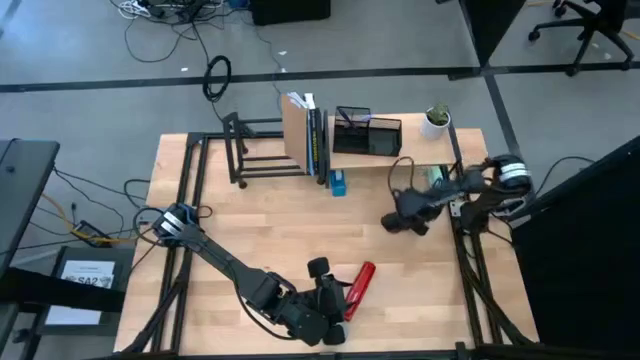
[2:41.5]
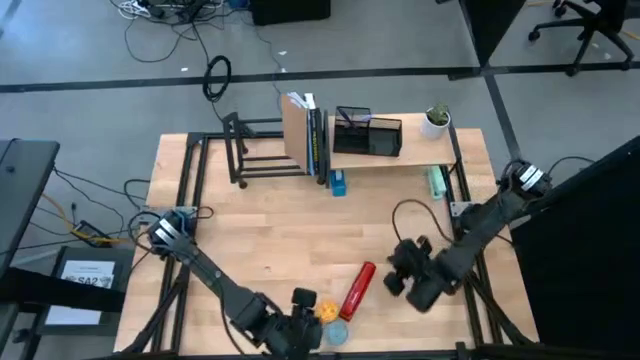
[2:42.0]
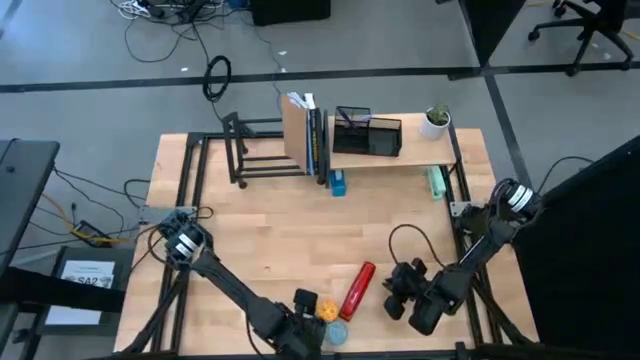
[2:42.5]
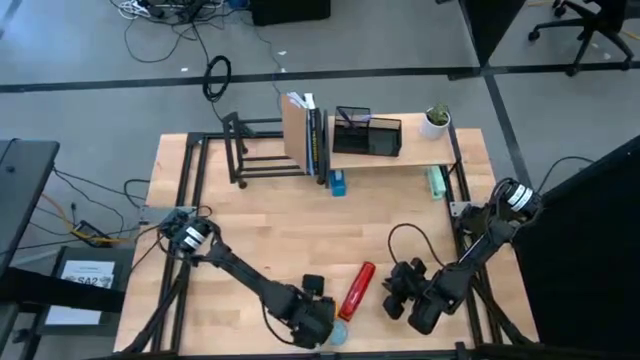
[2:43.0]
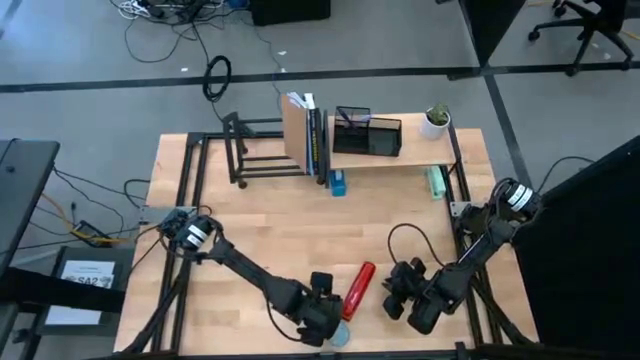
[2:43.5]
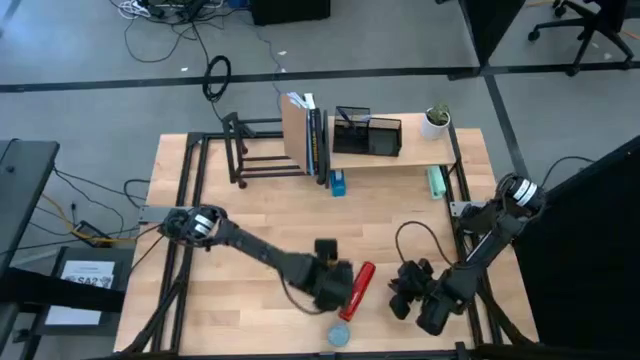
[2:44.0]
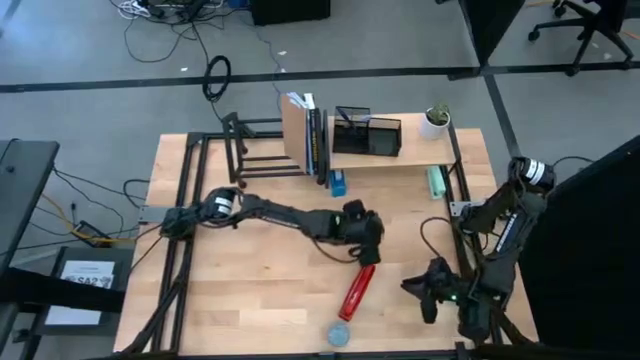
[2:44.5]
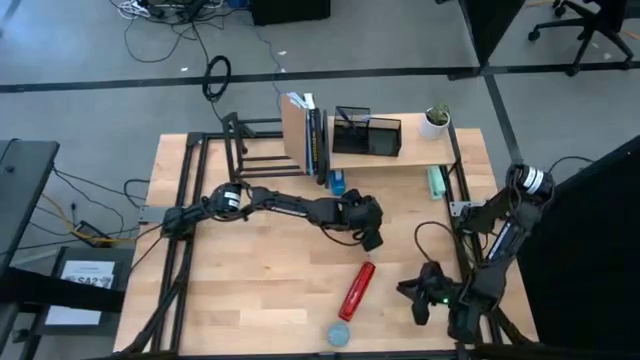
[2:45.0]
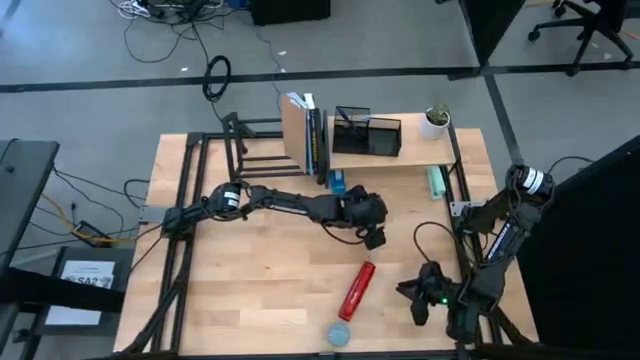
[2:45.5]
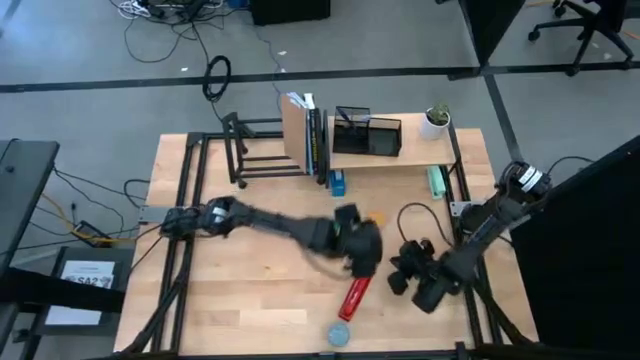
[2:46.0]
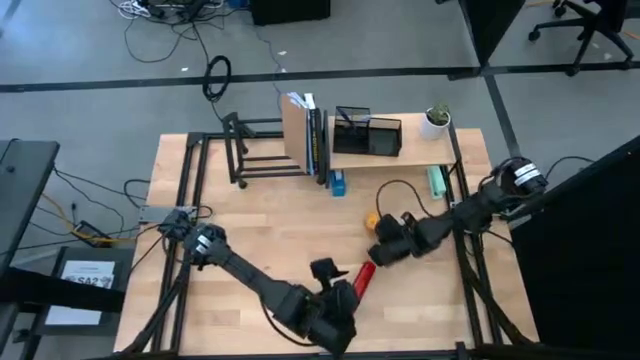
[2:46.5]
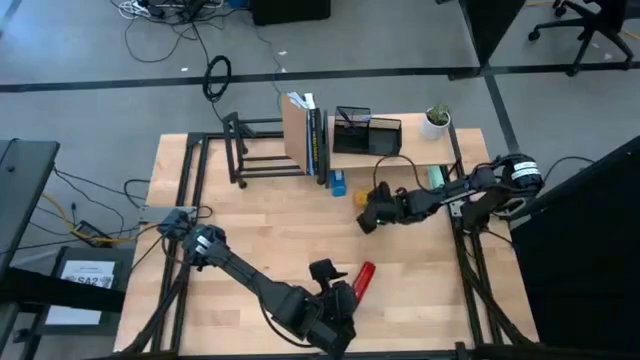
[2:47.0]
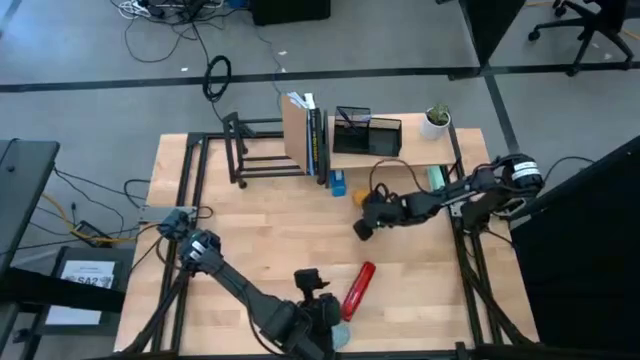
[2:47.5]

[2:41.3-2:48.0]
Task: Stock shelves
Put the yellow scented candle under the shelf

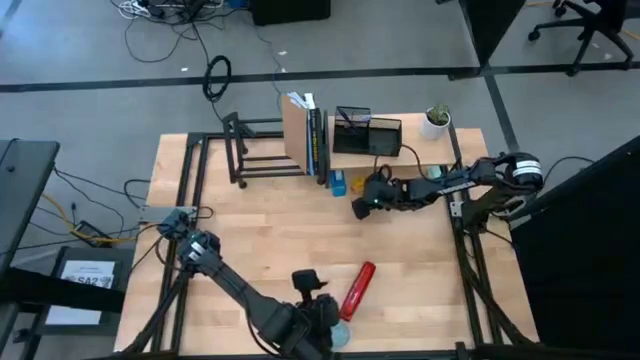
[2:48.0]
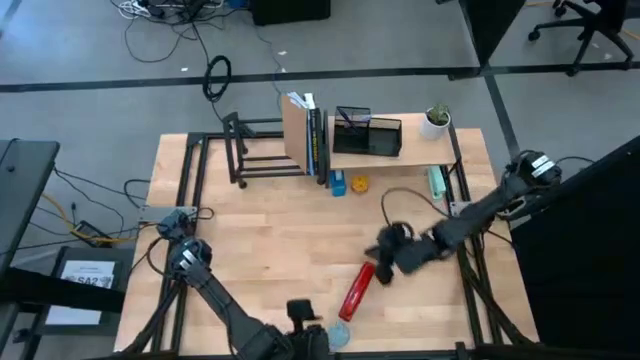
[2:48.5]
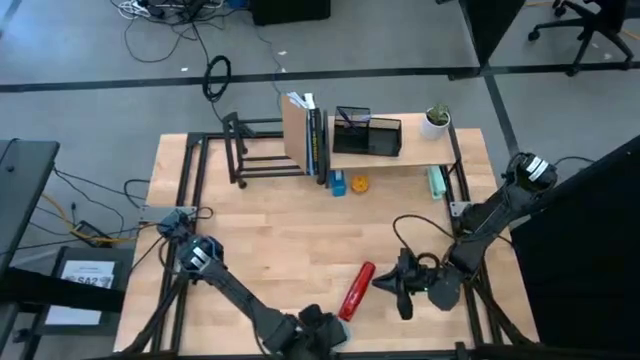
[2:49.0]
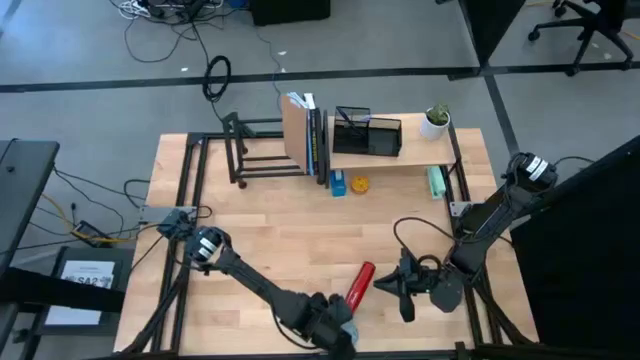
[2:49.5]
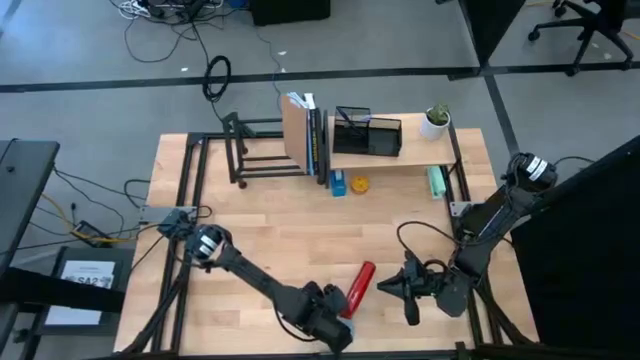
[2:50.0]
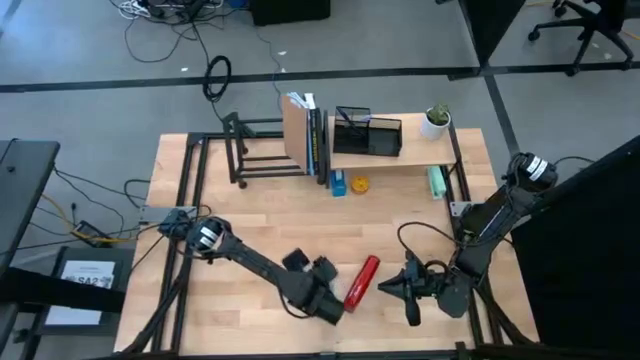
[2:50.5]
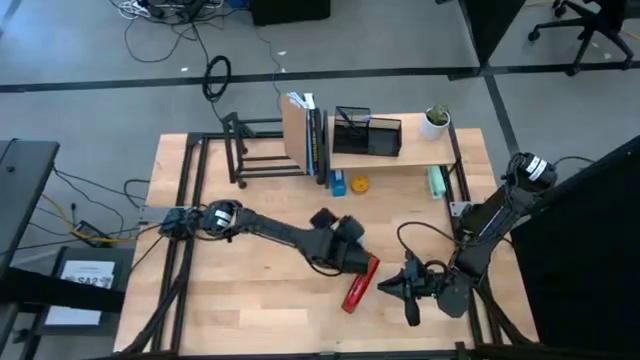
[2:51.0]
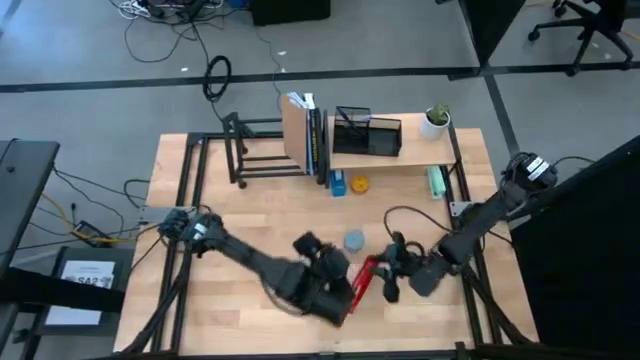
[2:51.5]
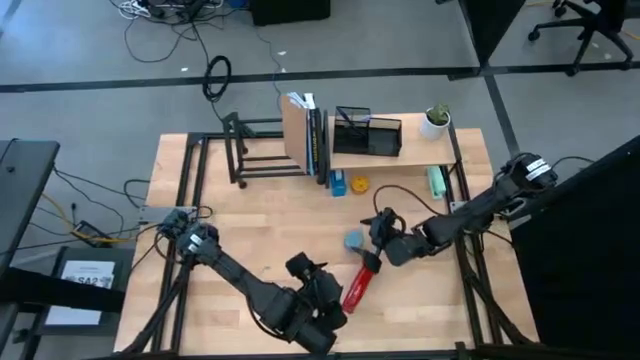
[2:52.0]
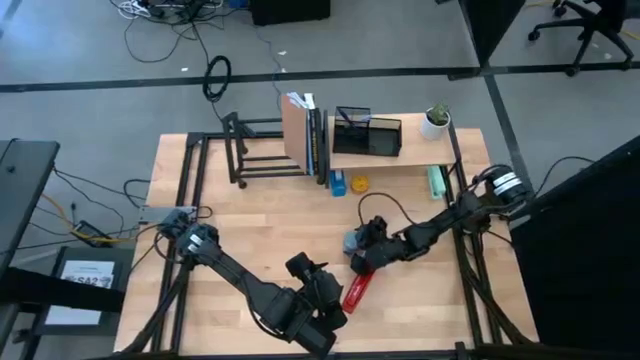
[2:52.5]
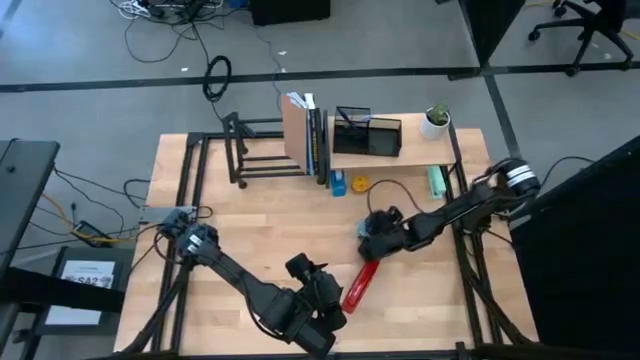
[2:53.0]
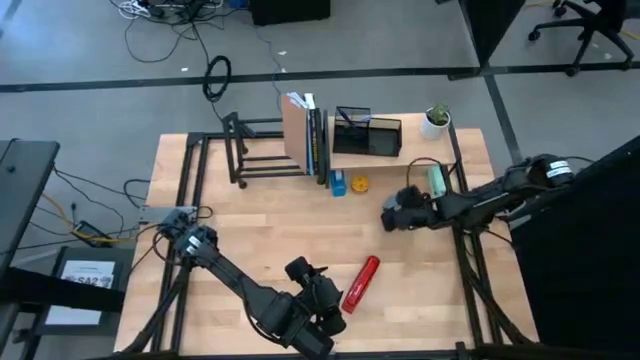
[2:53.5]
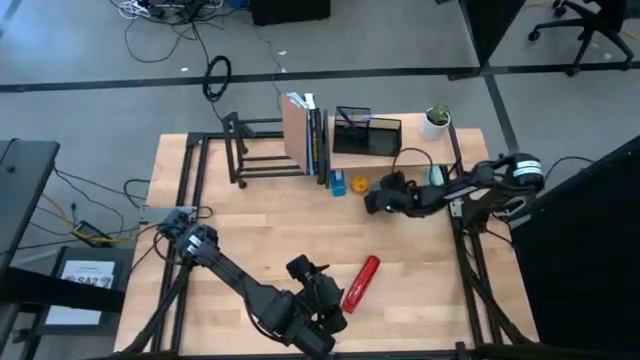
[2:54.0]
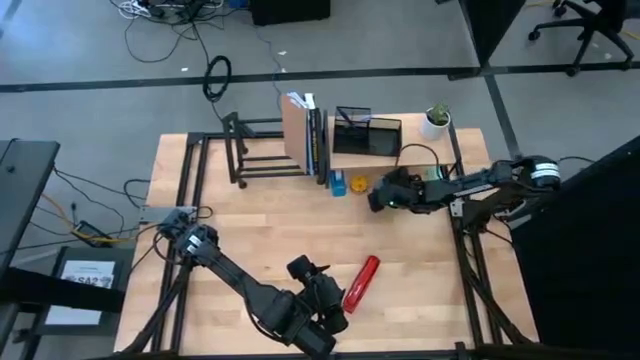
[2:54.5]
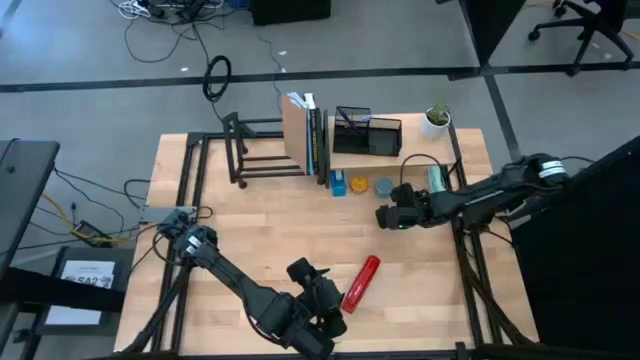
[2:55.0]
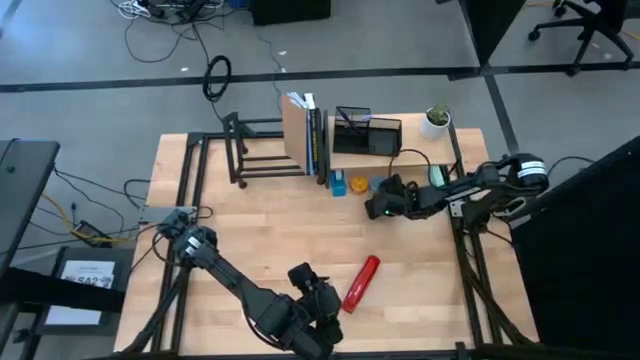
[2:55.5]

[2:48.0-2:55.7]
Put the blue scented candle under the shelf

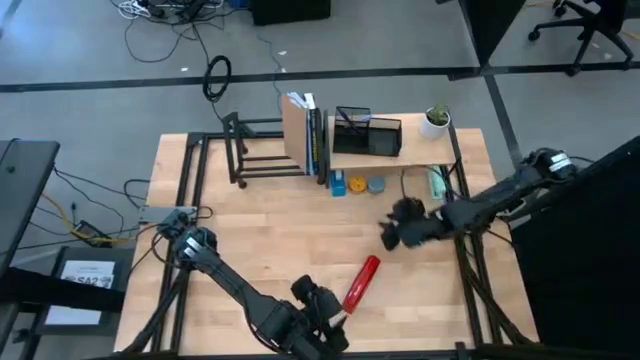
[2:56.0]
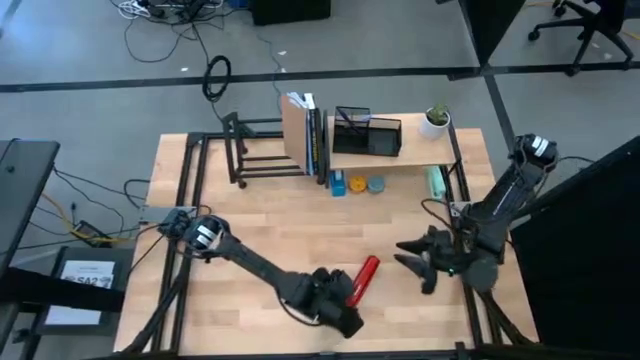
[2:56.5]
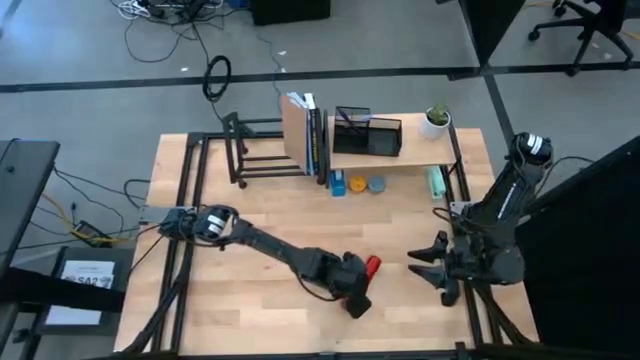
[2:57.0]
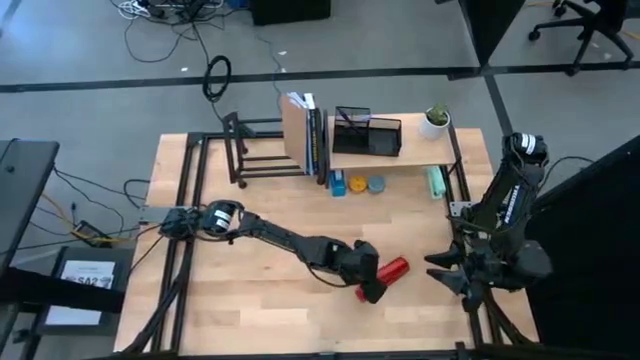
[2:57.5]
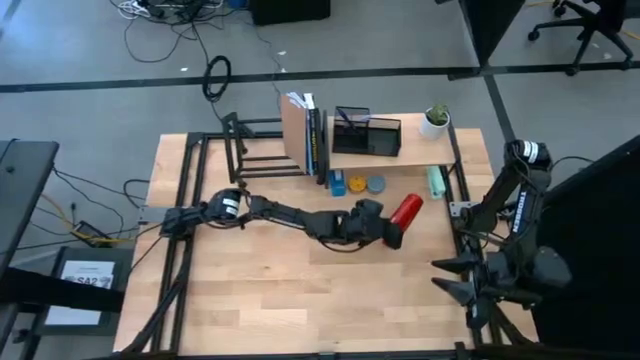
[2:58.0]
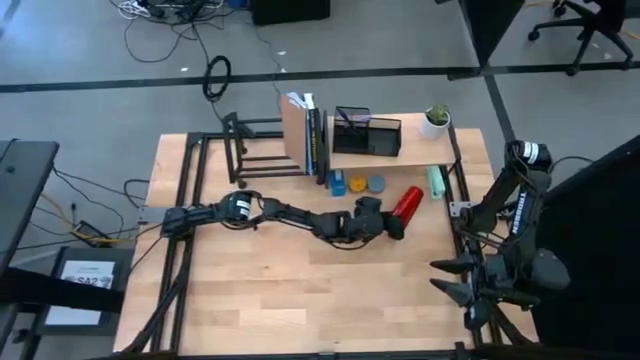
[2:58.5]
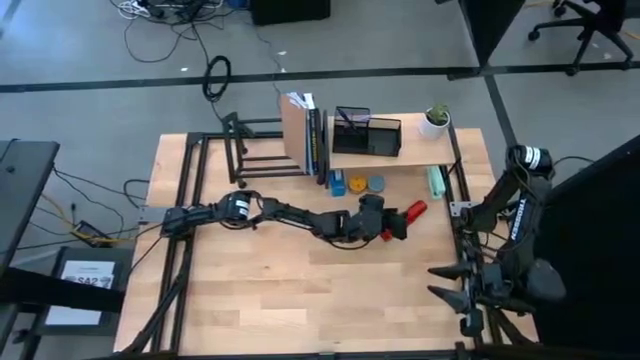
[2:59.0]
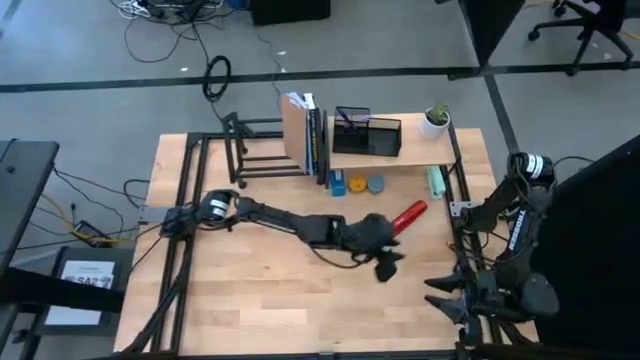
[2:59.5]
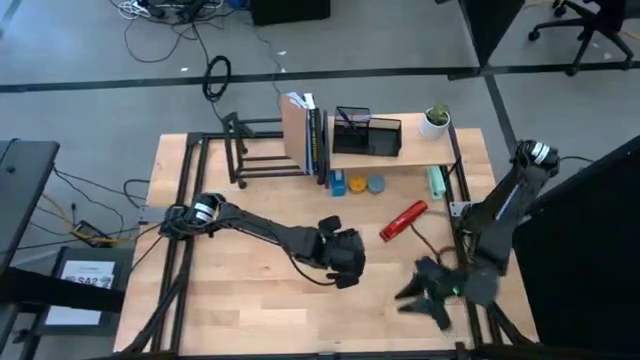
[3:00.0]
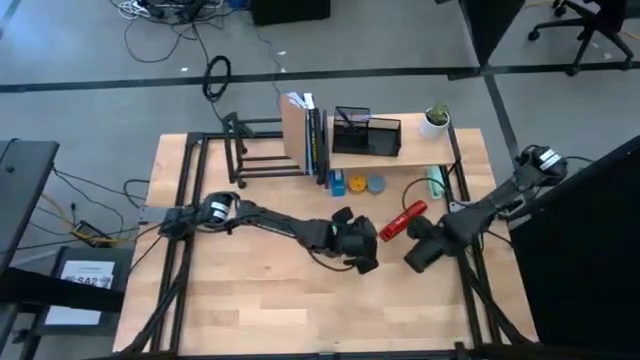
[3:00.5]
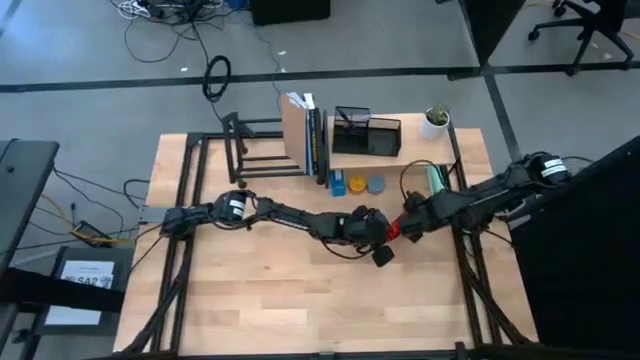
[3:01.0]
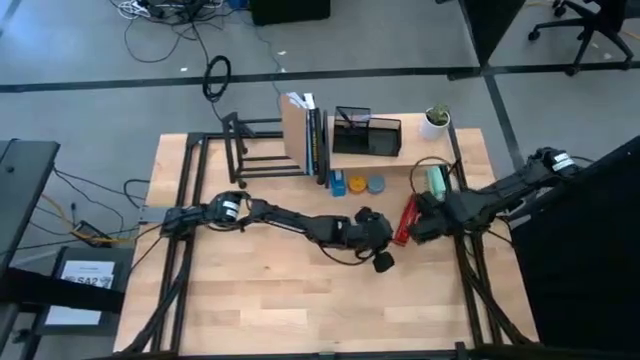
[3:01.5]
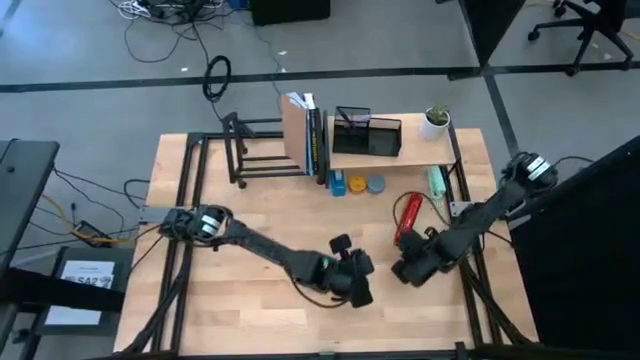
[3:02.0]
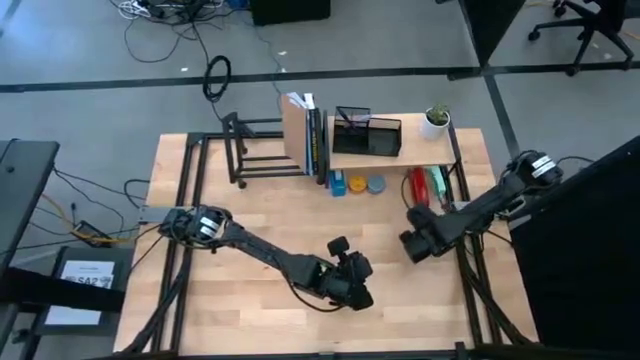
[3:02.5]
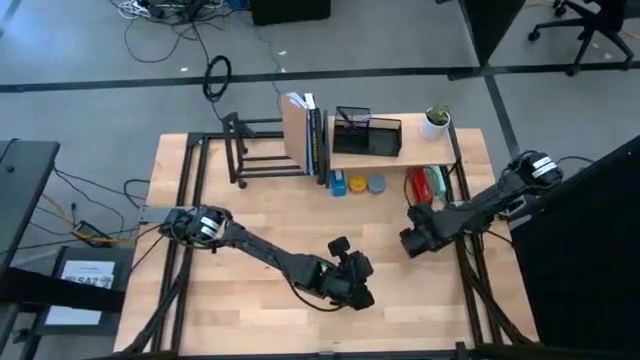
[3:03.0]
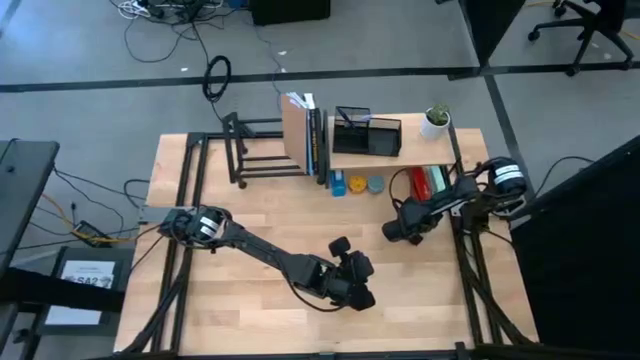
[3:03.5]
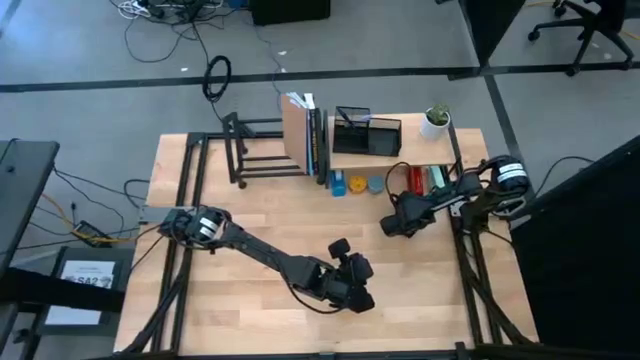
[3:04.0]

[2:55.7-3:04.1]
Put the red stapler under the shelf
